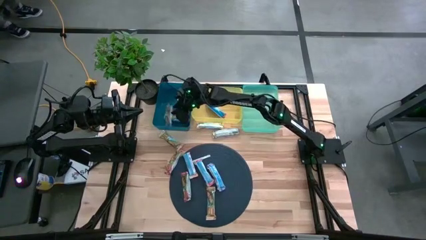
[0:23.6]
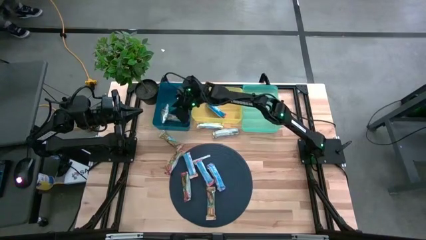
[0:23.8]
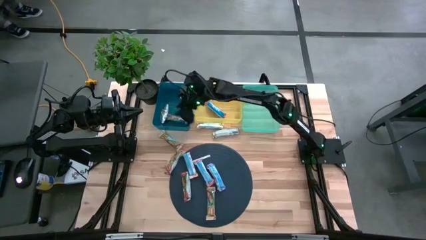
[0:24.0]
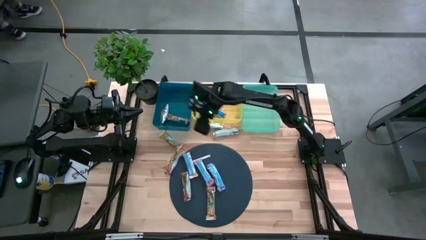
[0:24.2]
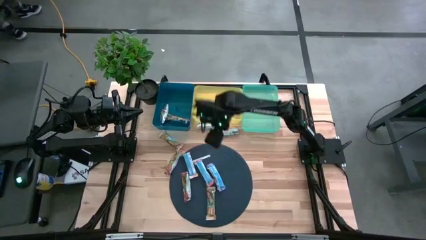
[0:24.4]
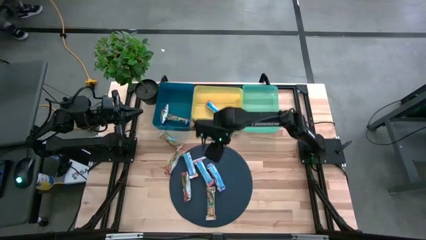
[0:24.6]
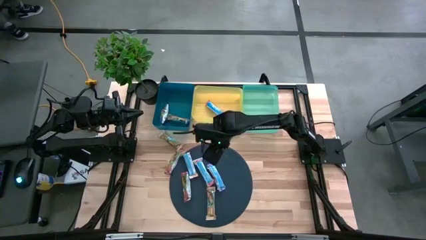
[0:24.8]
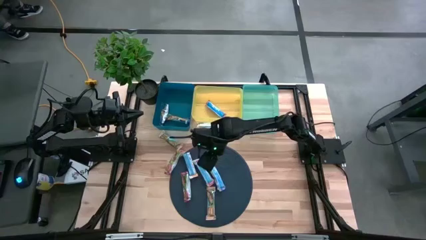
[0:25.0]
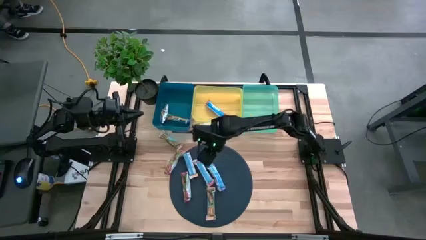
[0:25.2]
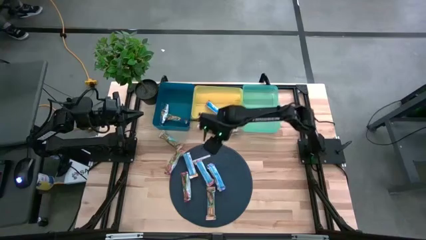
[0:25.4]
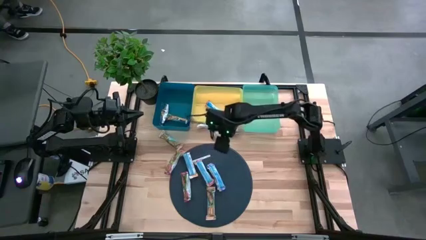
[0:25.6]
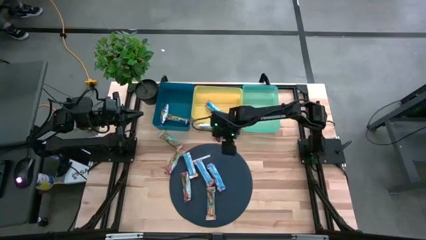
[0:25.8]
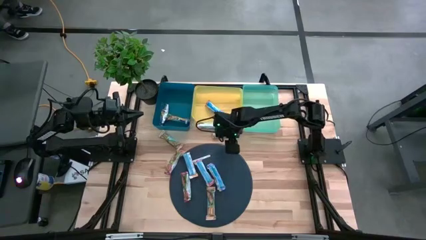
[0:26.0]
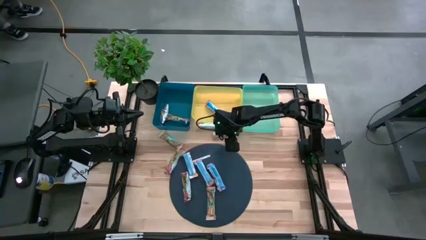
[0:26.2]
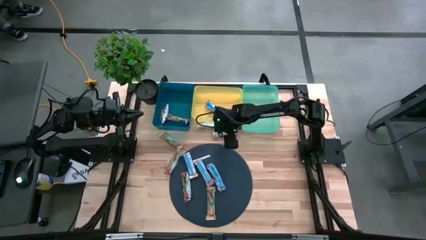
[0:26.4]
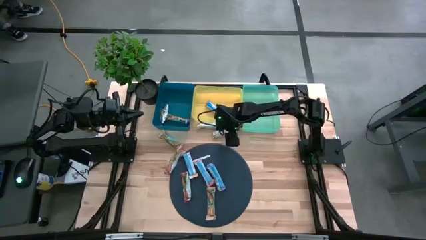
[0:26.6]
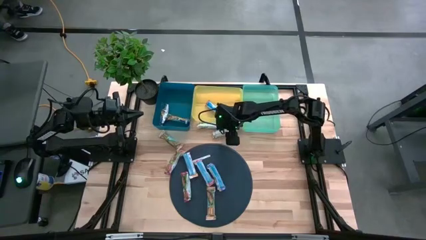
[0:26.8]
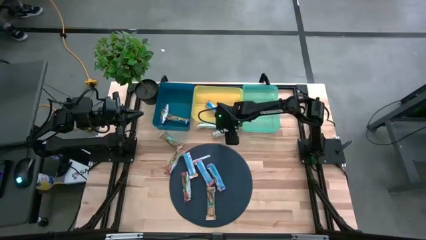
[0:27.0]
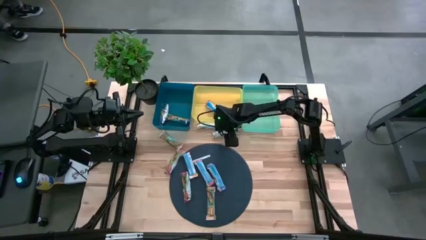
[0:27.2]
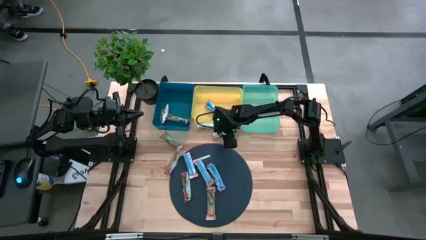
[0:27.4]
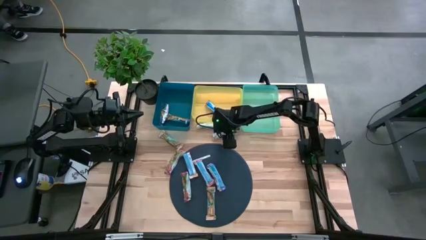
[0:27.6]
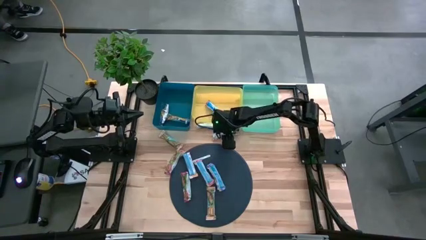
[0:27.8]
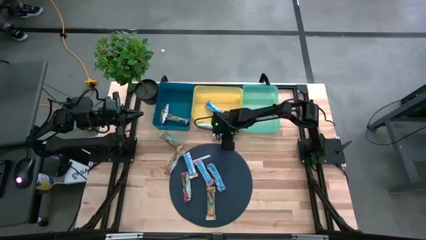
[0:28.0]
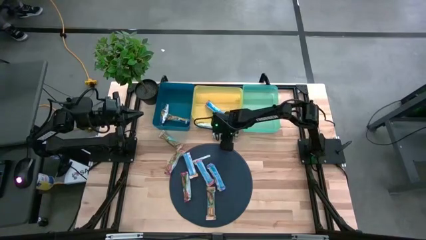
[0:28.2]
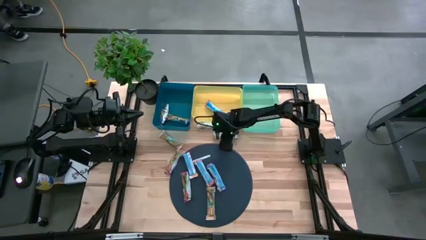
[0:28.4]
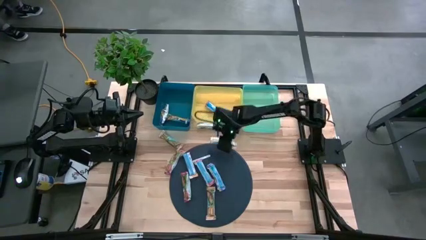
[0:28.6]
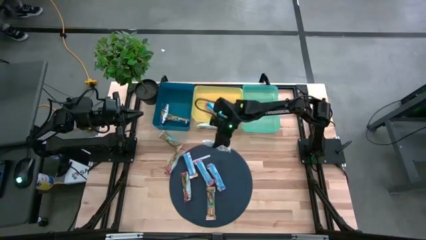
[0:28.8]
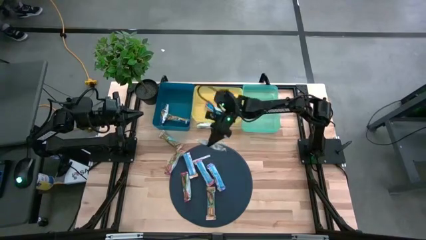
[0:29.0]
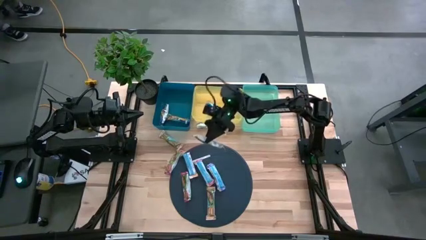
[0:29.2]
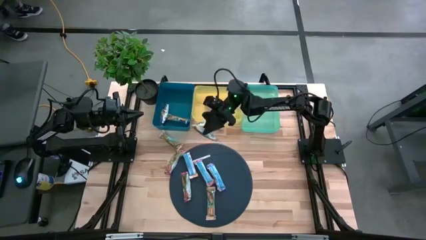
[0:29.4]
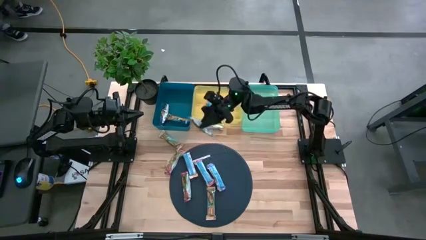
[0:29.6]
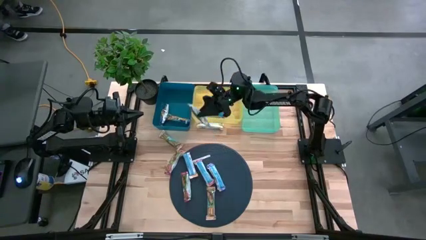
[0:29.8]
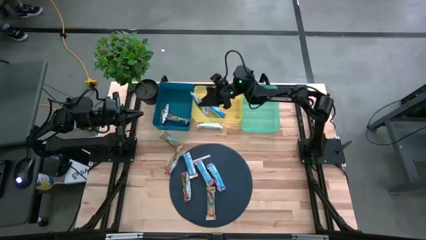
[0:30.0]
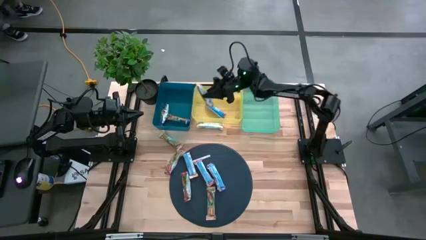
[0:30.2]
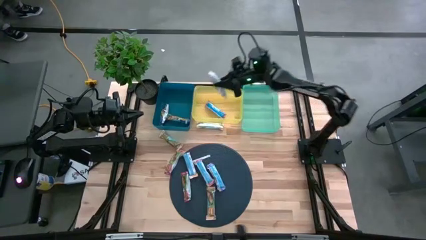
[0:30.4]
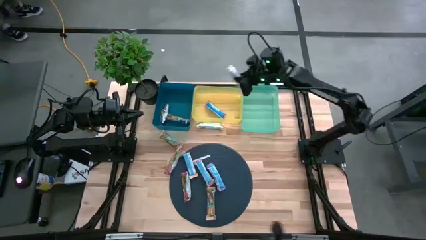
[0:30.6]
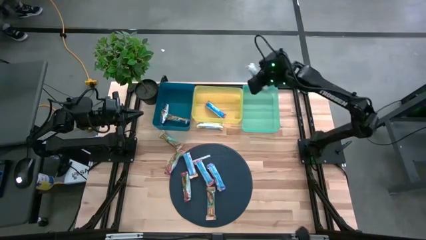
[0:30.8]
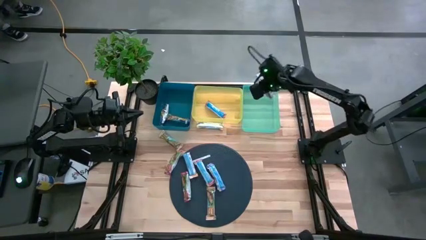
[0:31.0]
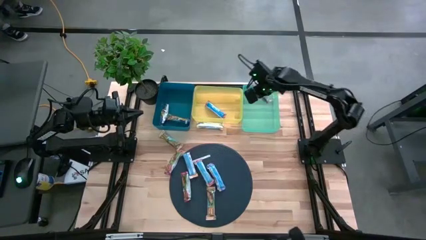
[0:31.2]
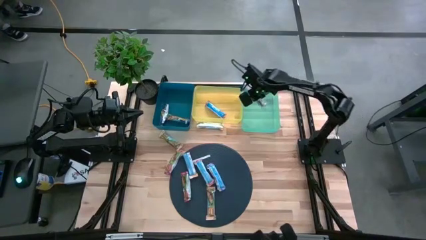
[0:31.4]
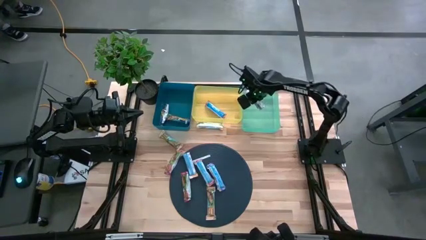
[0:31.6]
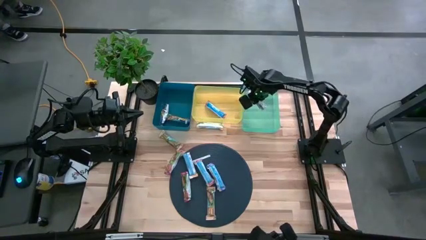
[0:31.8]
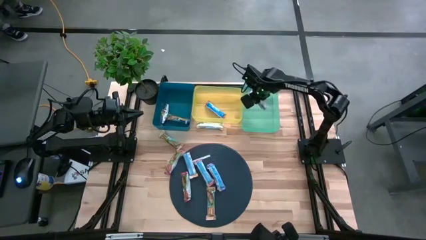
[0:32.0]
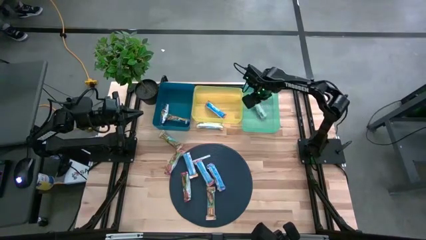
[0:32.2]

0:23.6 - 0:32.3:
Task: Pick and place Granola Bars by type
Put the yellow granola bar into the green bin

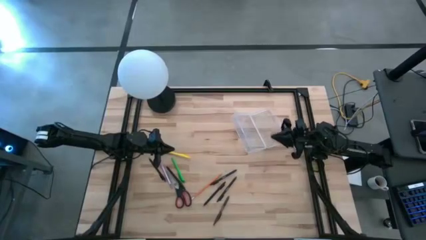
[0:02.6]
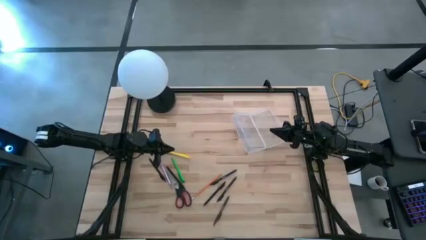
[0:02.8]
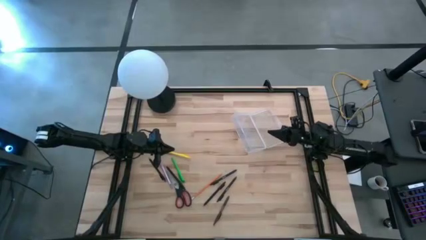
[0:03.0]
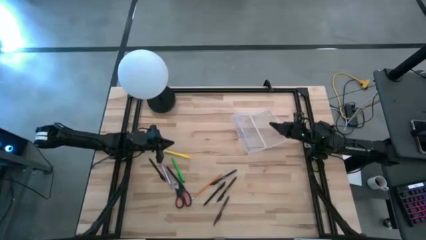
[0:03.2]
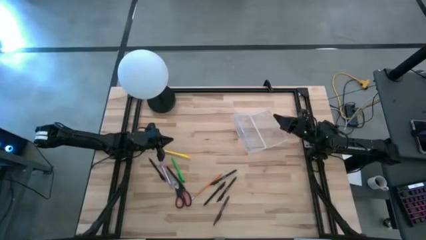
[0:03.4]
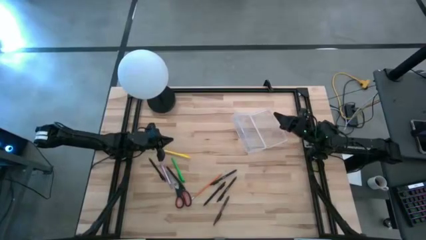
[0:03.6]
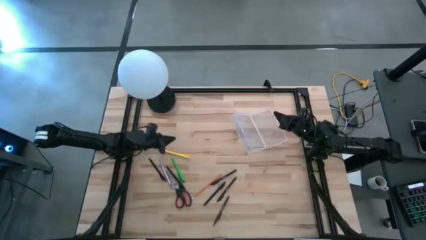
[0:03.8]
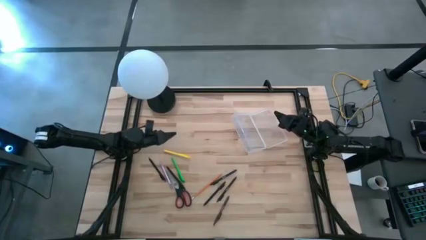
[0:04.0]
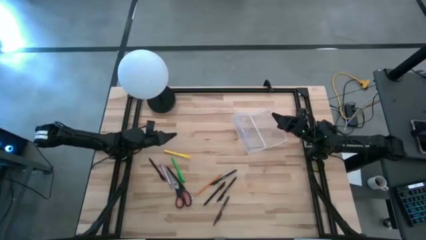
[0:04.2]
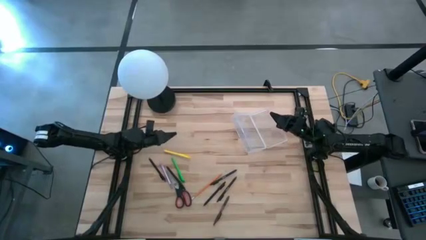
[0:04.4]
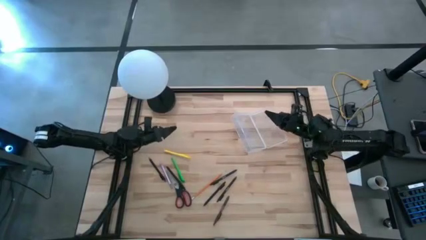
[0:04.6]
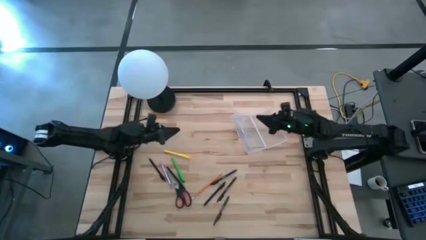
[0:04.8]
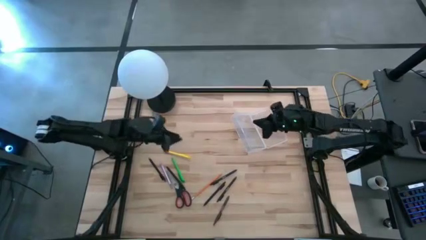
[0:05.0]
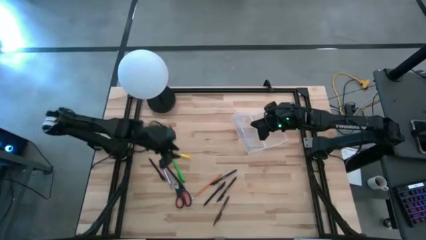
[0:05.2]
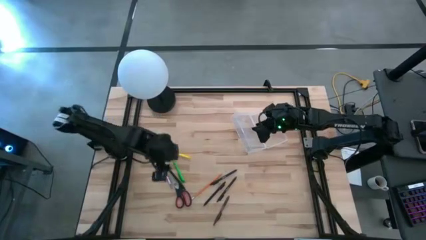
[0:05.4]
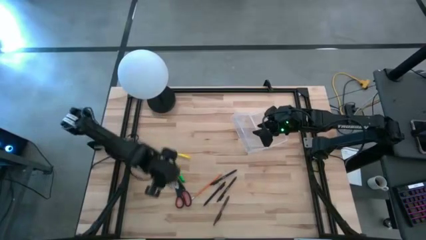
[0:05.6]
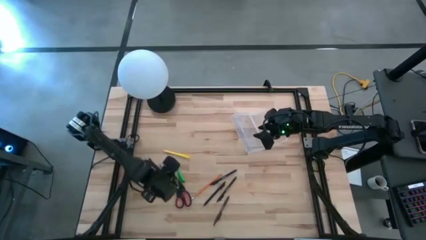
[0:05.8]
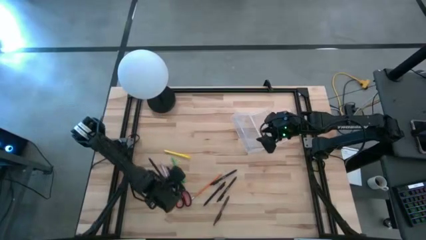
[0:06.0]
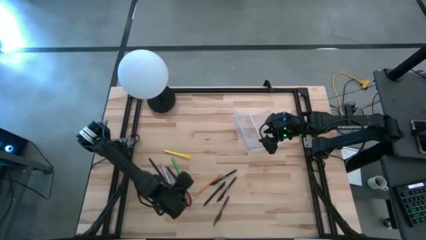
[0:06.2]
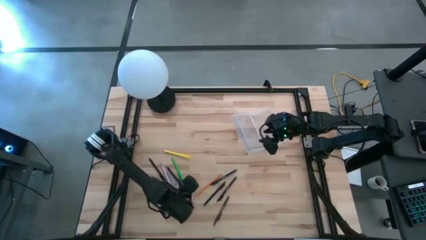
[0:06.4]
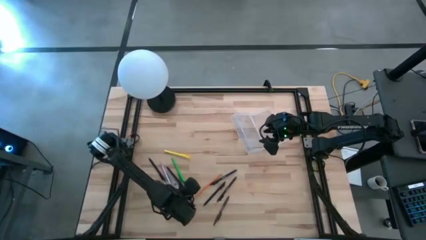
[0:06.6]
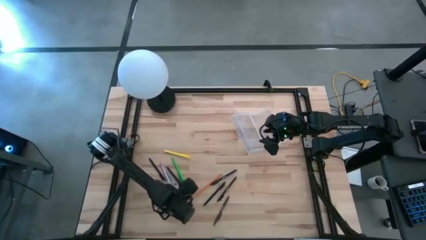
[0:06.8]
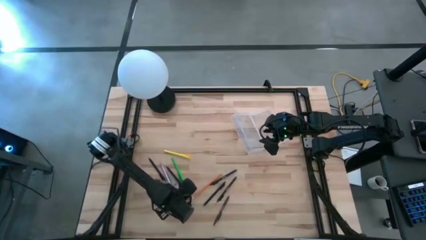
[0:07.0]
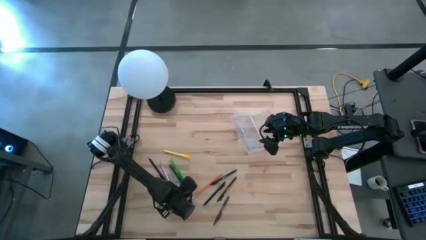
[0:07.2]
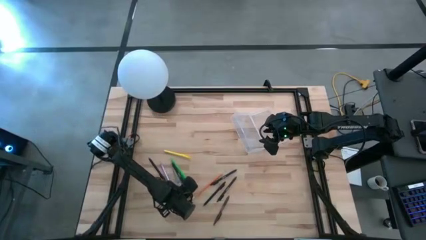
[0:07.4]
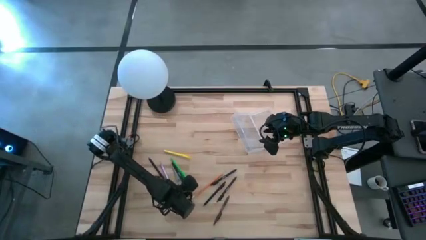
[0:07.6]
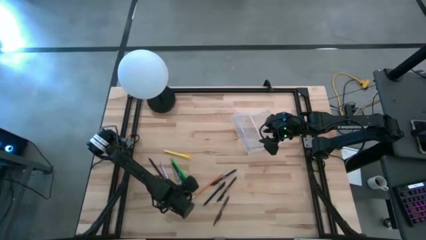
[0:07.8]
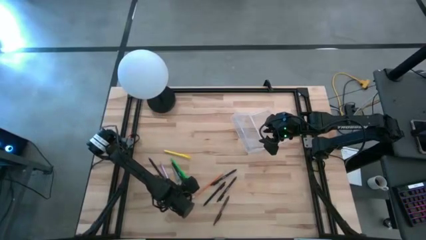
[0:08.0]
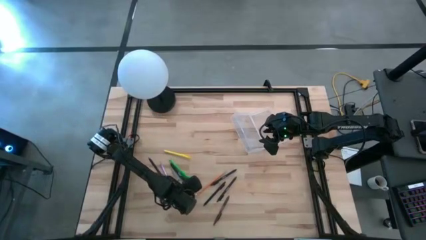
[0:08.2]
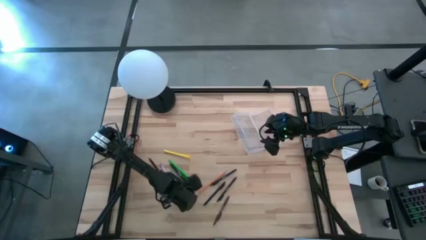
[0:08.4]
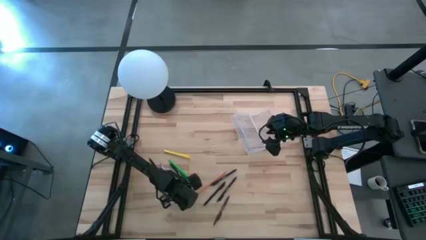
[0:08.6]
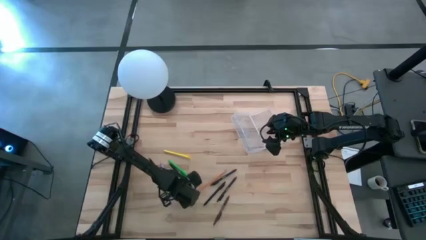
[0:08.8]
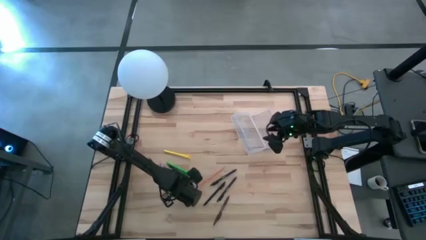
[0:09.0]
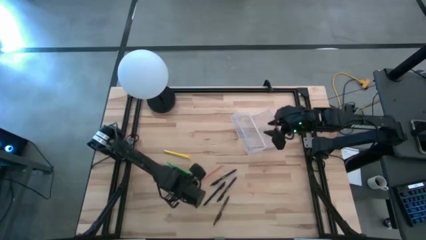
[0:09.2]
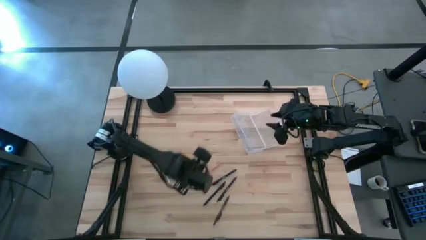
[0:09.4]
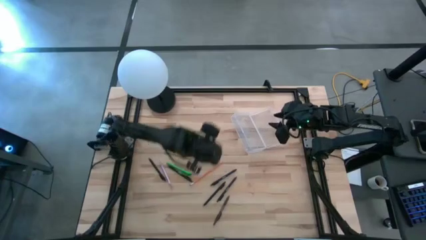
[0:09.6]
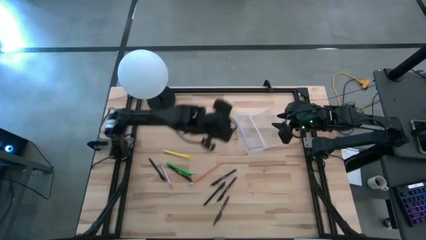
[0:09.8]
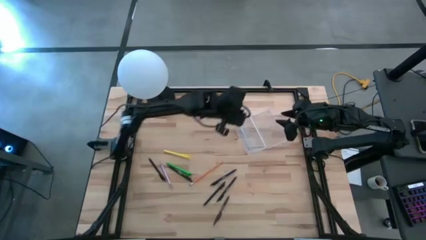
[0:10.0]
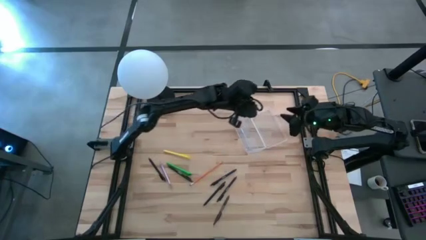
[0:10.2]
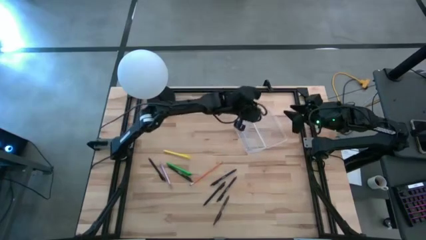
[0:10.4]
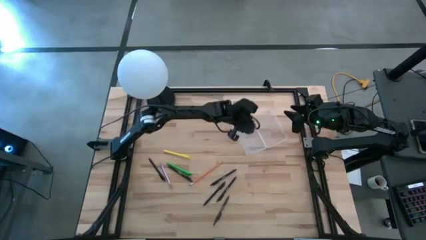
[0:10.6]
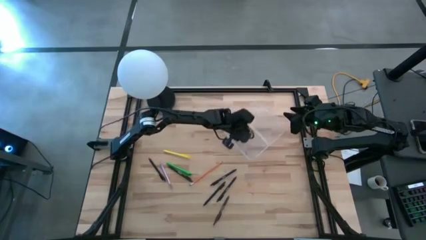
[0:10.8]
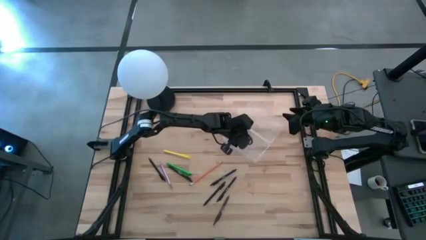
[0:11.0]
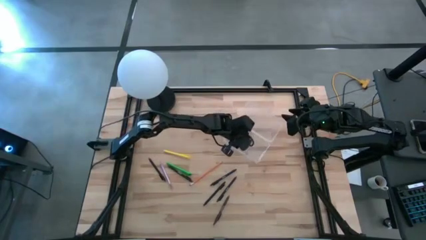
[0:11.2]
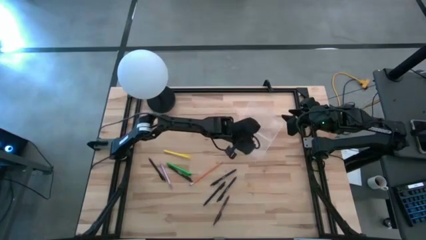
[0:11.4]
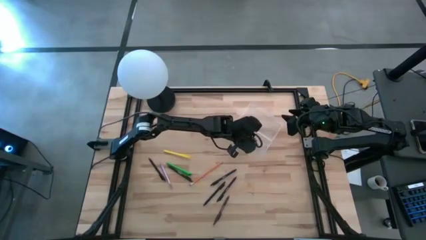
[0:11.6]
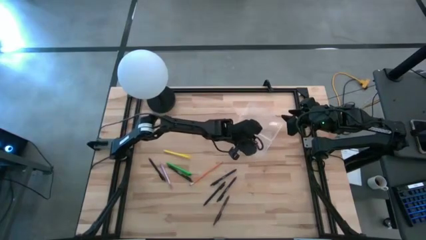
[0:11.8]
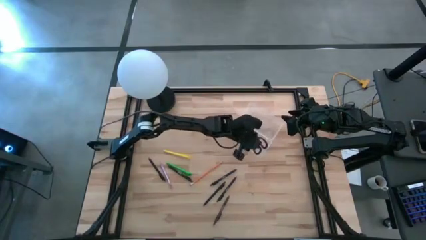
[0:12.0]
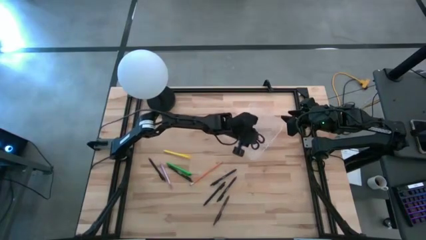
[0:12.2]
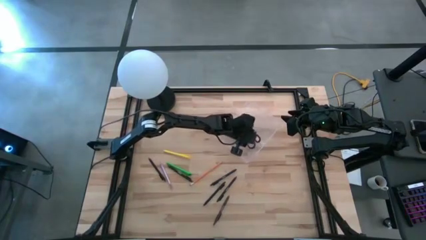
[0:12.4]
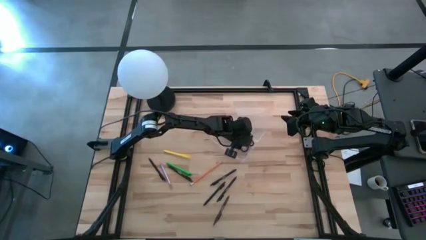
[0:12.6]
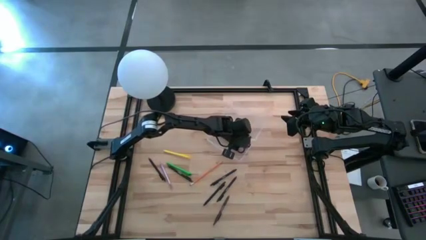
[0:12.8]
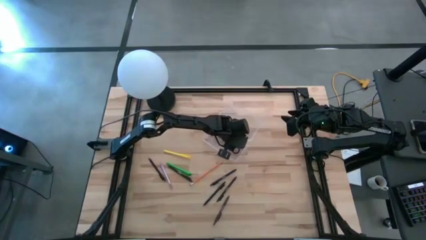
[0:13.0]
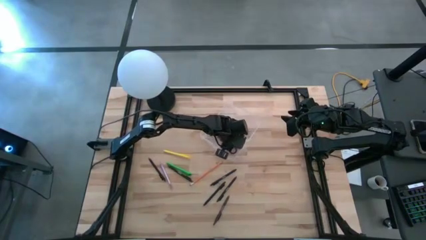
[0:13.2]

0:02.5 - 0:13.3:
Task: Pick & place school supplies into a supply box
Put the black scissors into the transparent supply box
